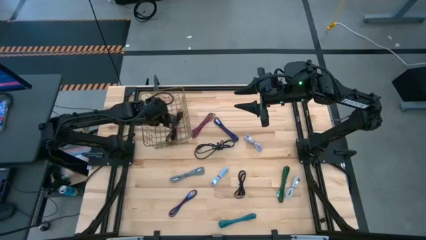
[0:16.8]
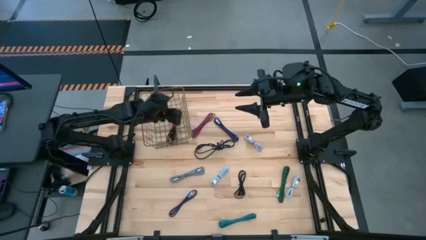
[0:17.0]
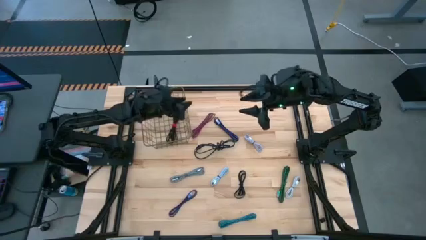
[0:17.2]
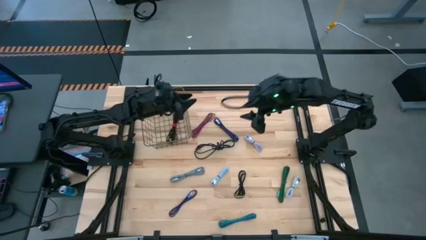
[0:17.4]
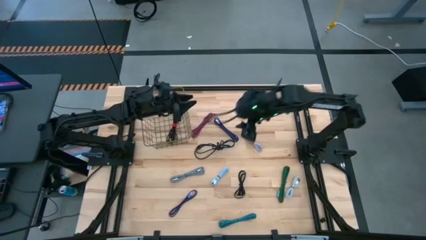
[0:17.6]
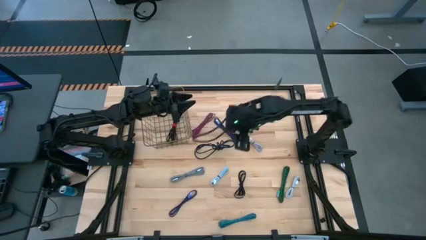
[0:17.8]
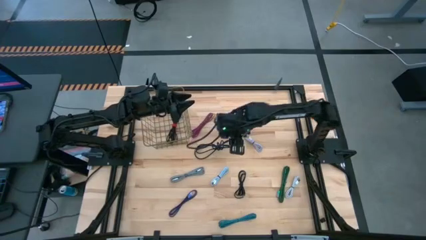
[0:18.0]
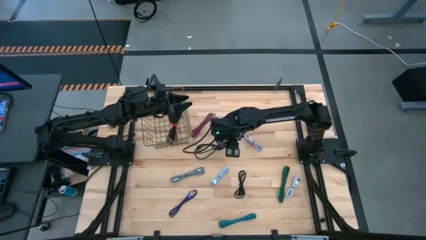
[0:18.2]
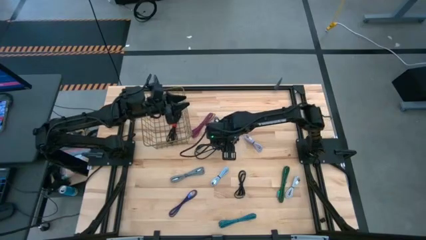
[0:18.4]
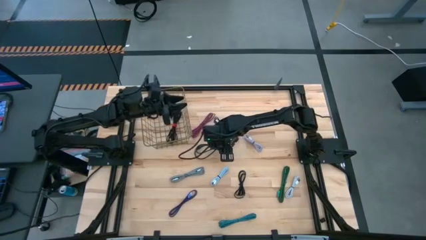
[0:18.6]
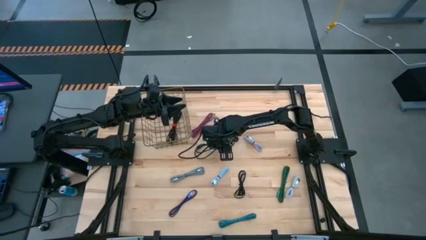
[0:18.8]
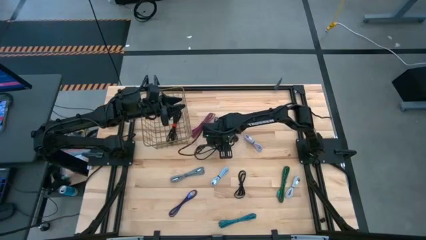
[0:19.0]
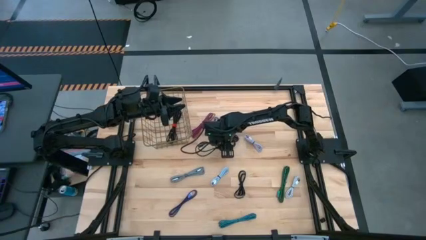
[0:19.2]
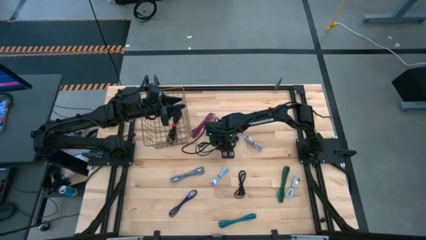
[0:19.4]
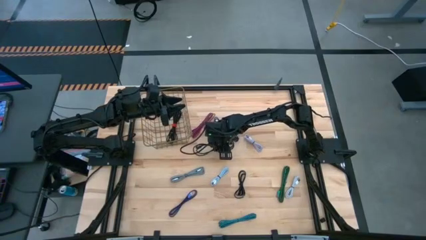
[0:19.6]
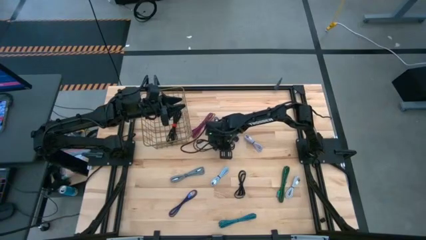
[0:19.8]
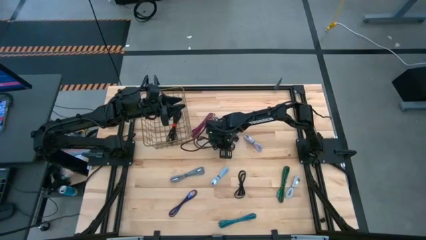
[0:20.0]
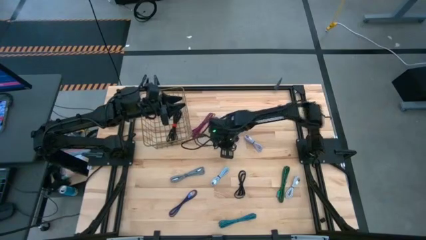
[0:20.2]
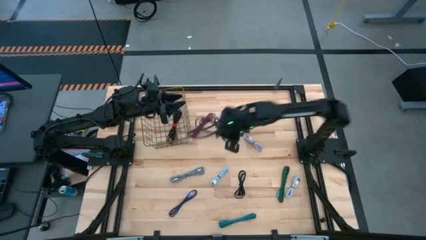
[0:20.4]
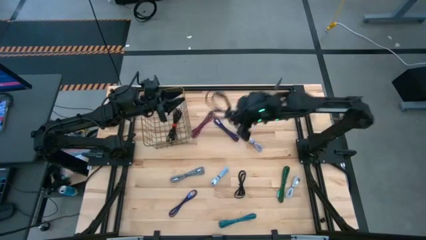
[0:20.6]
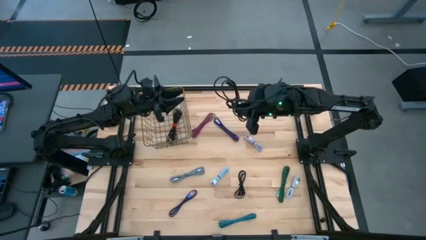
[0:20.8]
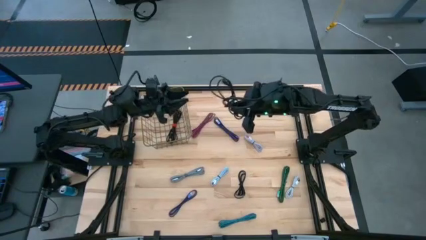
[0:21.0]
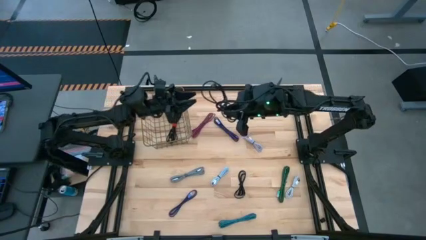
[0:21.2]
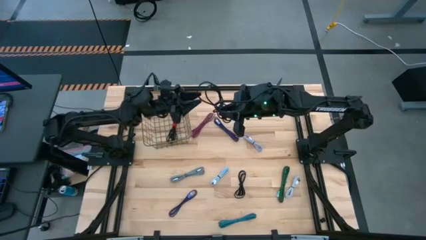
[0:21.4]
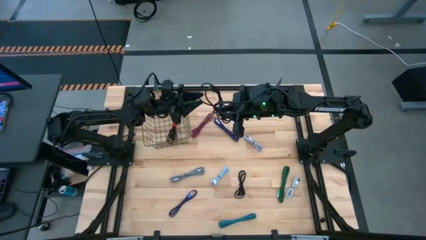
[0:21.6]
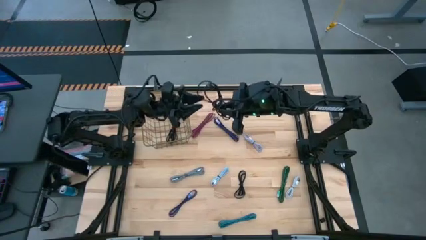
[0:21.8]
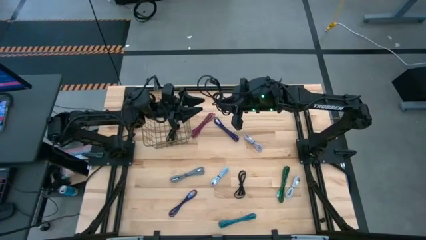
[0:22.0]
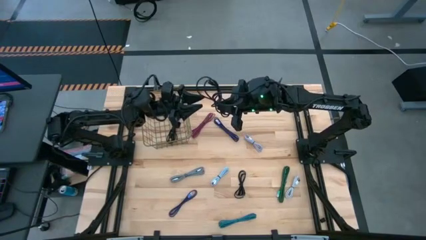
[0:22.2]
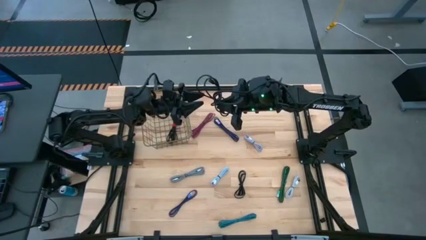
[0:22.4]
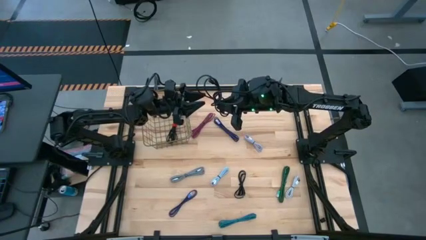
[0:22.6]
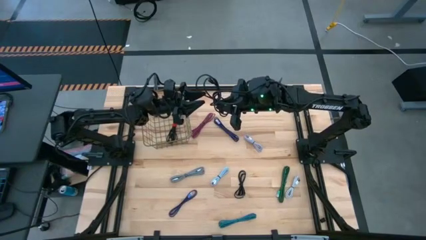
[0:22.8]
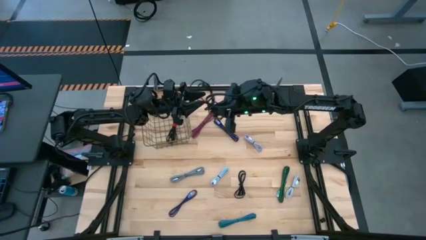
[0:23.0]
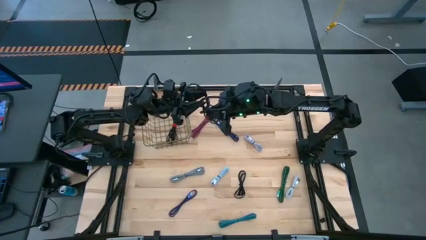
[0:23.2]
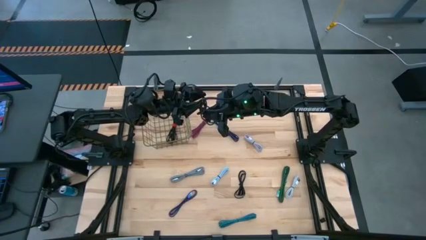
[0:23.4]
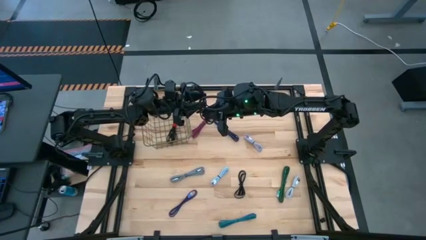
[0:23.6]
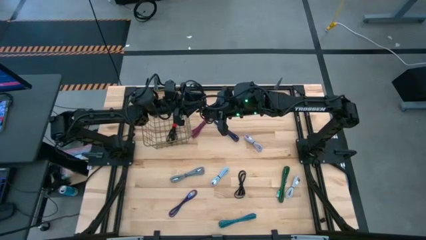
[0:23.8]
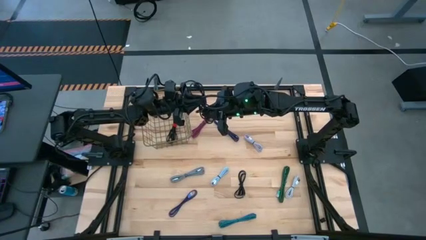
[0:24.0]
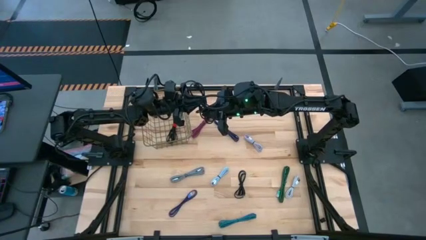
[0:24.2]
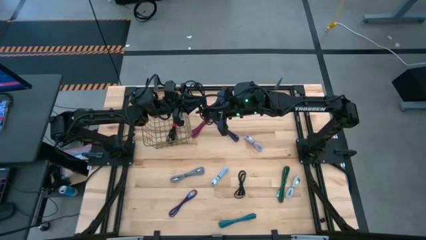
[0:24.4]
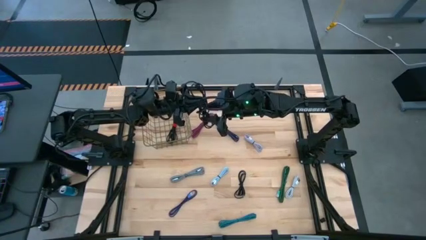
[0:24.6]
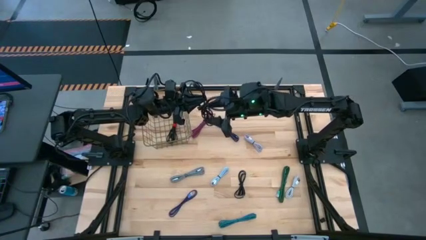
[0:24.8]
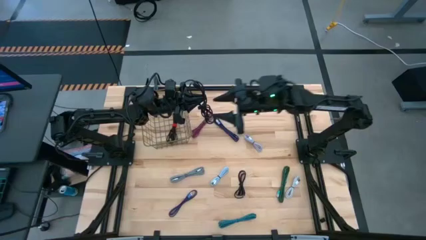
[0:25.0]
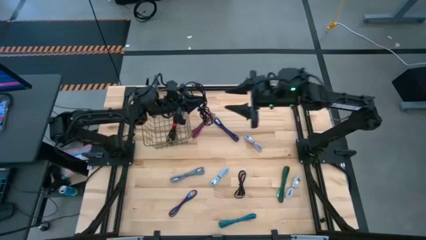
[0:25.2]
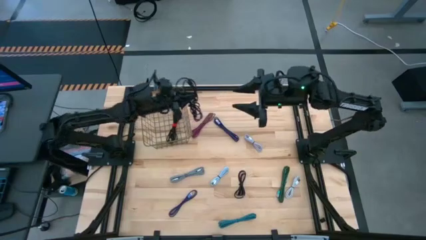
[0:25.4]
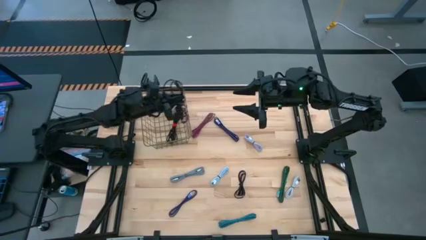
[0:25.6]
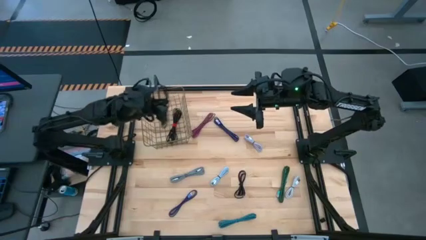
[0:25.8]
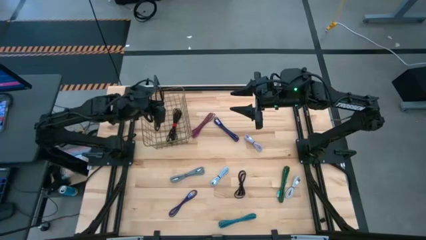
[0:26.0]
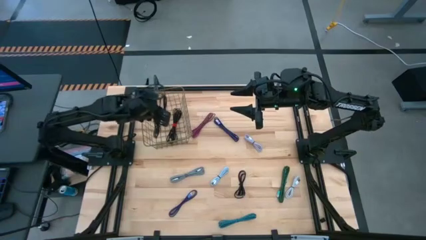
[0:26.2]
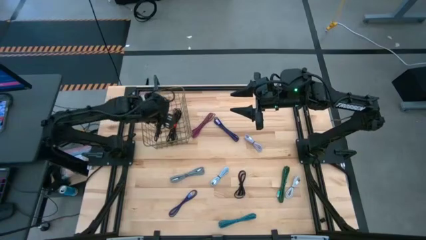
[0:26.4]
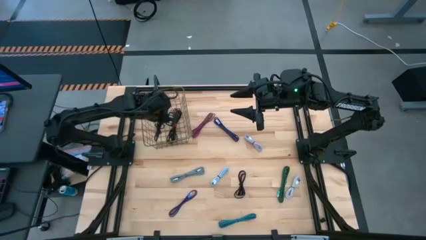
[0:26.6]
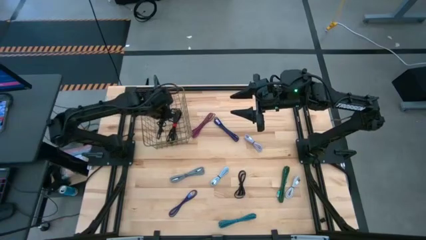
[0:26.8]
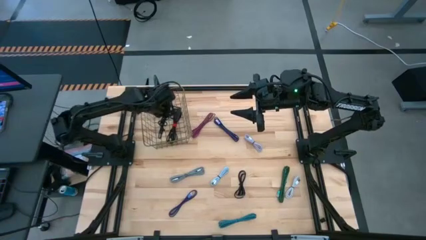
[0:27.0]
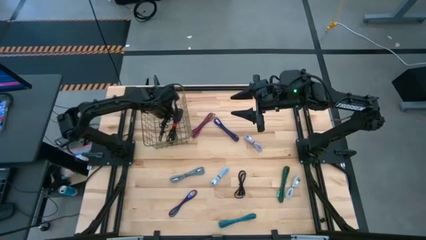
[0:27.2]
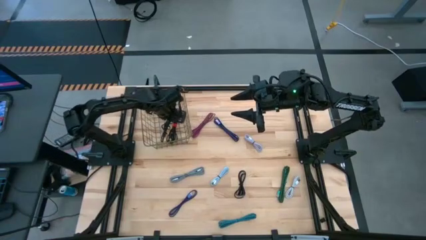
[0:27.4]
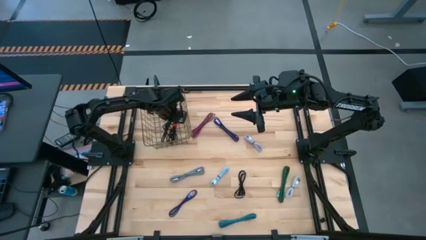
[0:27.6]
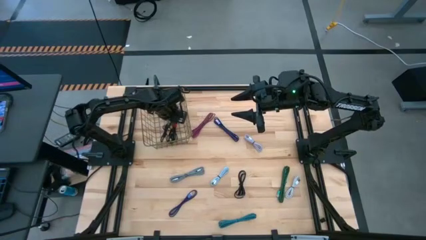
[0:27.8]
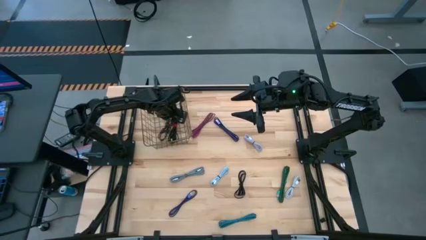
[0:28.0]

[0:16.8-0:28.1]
Task: Pick and place USB-C Cables
Put the top black charger cable into the gold wire basket

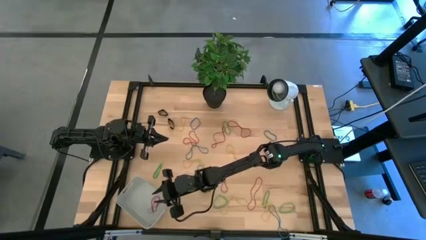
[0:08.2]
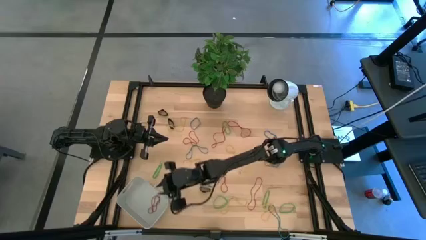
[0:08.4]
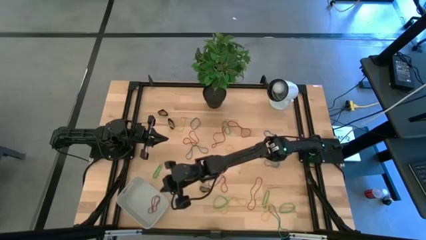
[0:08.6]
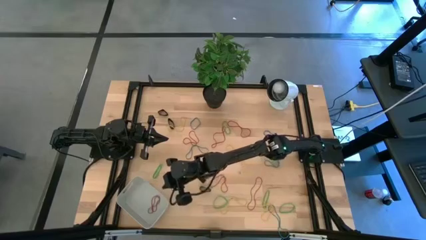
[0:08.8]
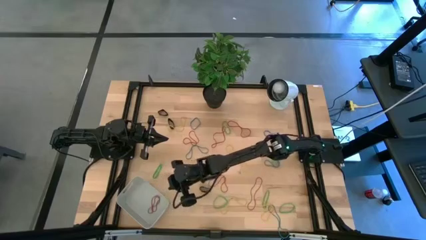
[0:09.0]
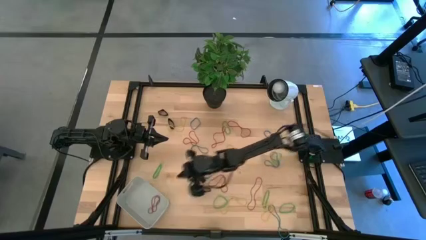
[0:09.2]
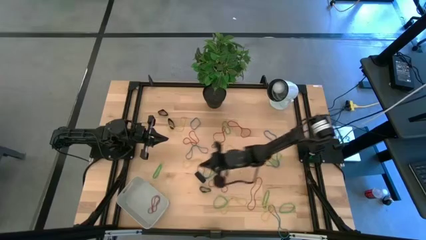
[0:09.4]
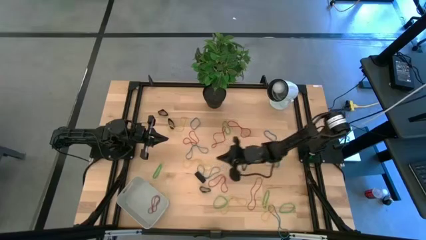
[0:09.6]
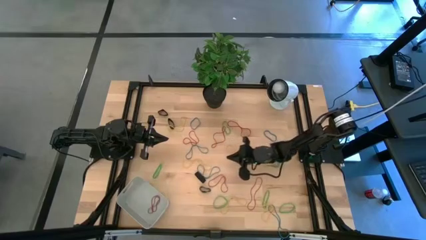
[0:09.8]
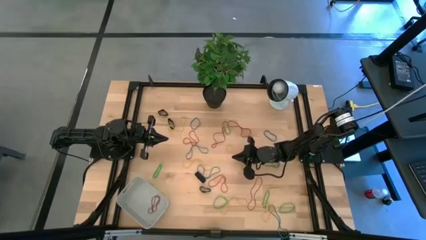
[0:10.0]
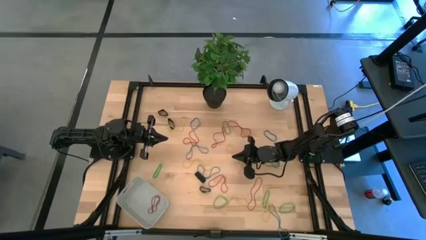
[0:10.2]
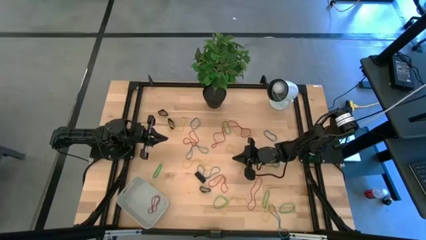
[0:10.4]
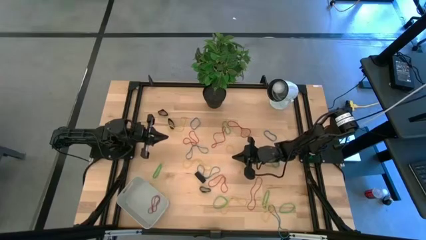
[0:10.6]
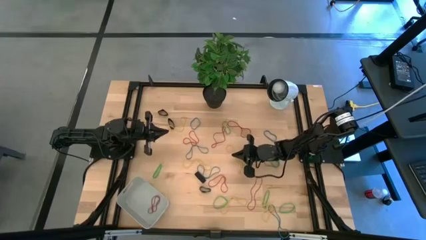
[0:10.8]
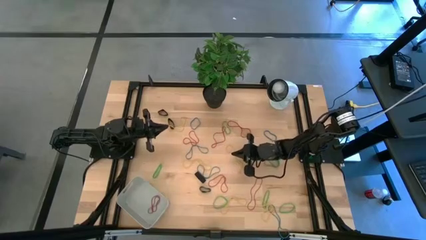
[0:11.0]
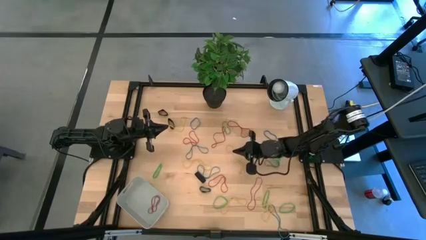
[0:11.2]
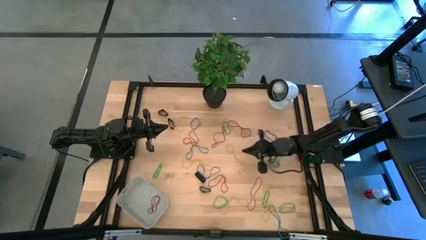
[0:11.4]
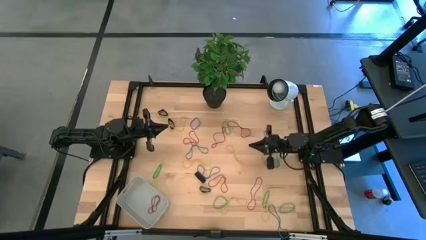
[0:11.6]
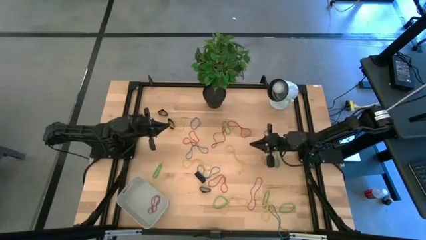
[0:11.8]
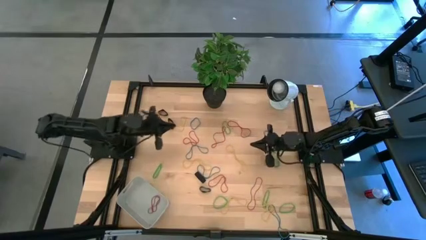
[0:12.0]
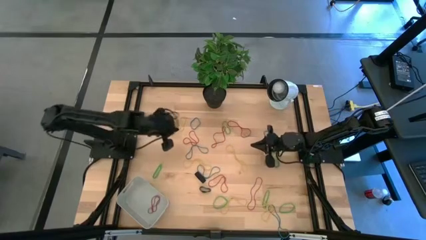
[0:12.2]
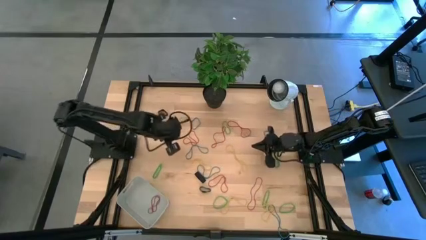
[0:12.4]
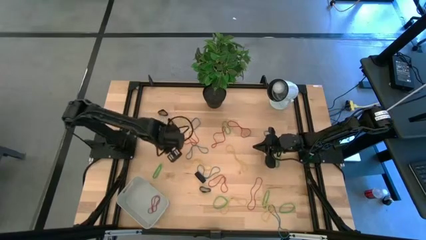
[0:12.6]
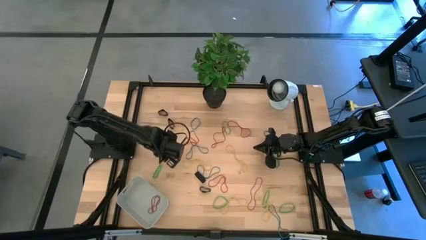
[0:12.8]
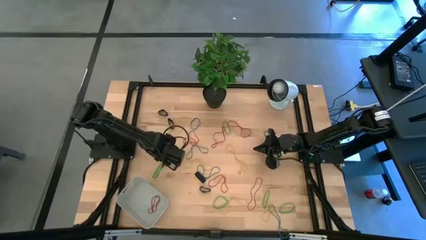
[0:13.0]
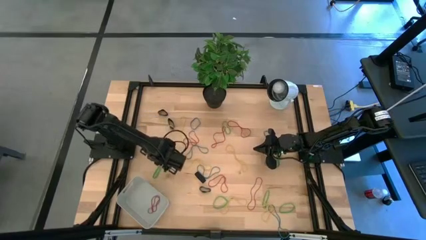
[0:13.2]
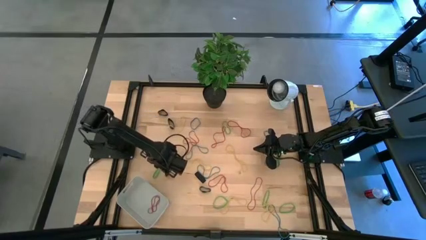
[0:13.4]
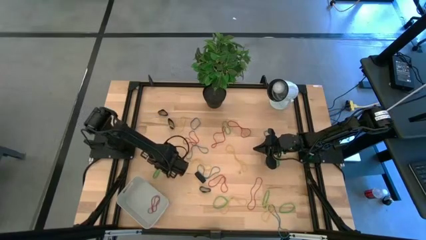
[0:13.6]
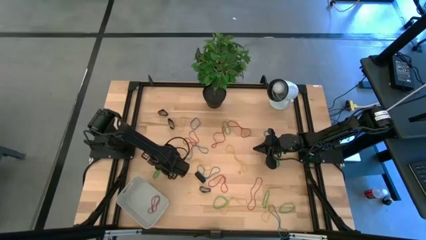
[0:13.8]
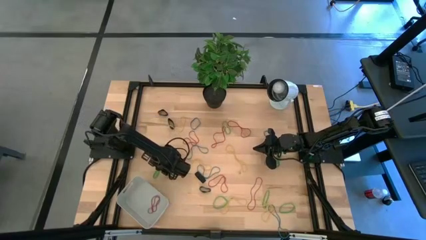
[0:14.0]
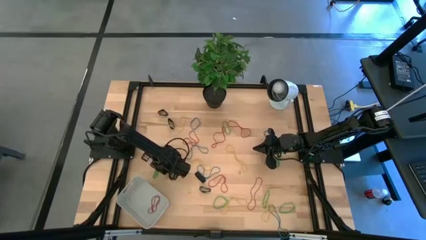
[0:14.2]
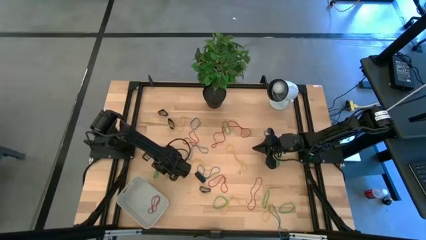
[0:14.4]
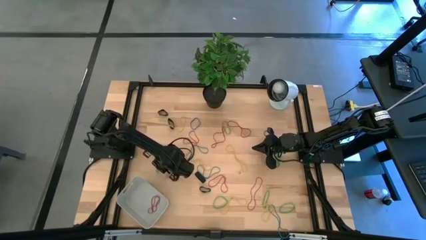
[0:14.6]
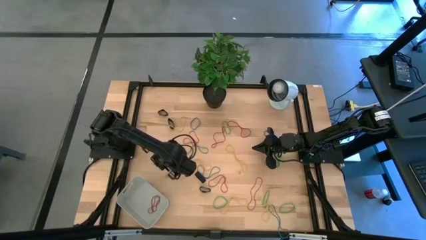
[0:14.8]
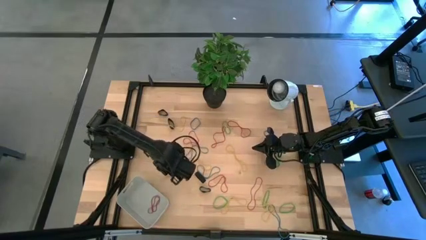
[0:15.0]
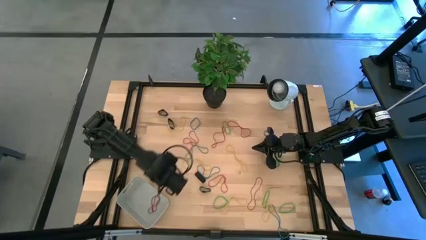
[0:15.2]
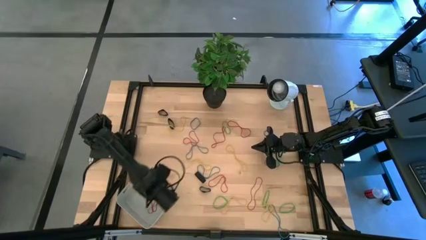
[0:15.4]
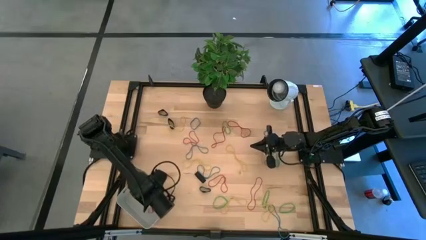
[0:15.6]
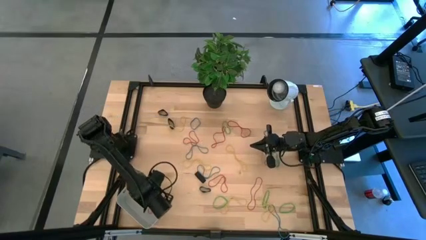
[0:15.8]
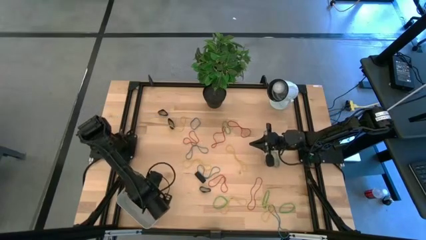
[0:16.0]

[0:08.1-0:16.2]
Task: Pick and place rubber bands into bin
Put the green rubber band into the gray bin
